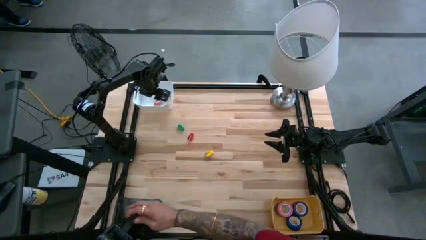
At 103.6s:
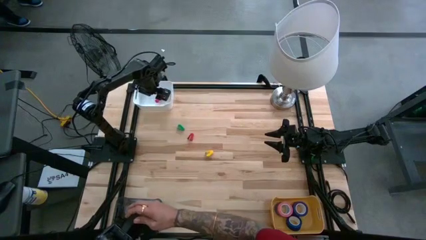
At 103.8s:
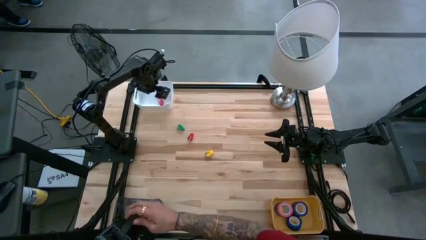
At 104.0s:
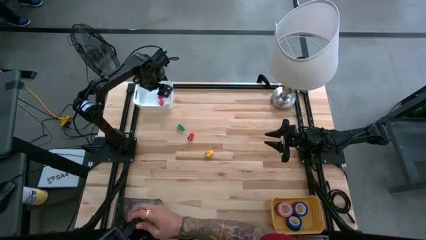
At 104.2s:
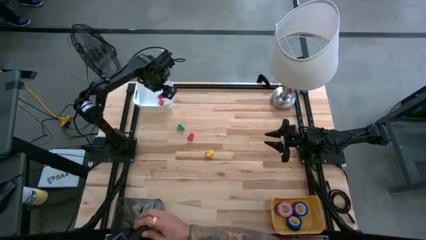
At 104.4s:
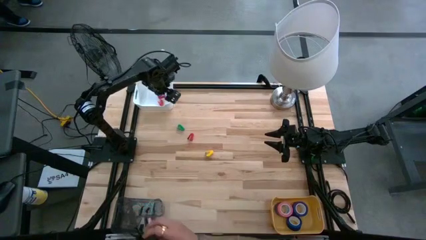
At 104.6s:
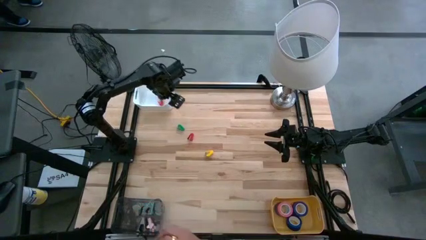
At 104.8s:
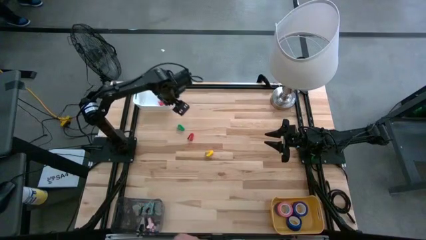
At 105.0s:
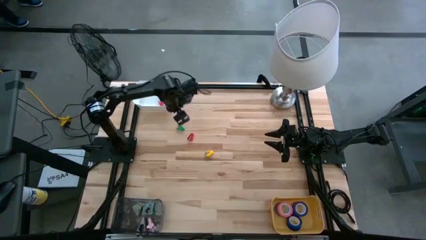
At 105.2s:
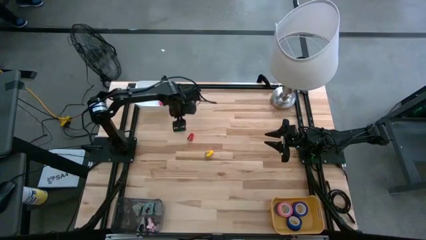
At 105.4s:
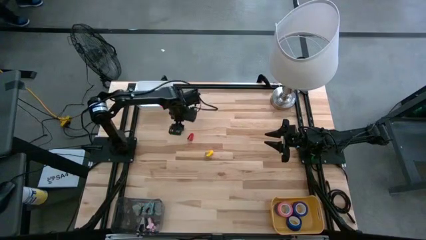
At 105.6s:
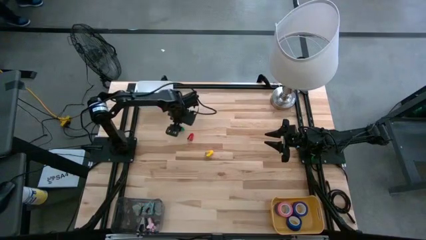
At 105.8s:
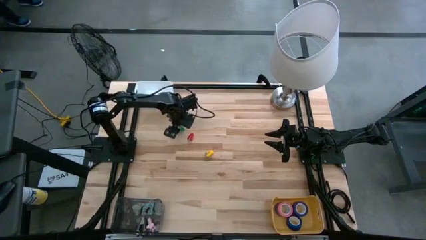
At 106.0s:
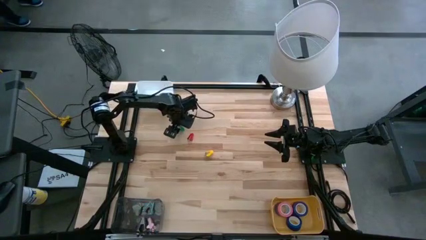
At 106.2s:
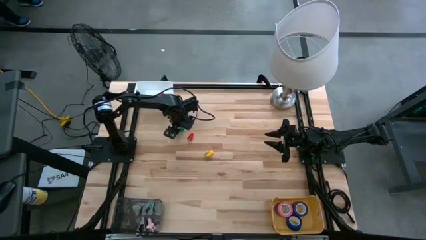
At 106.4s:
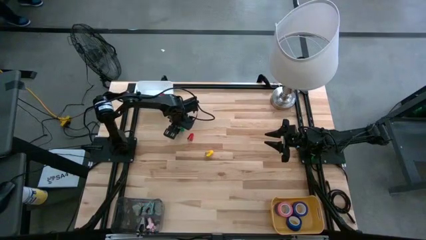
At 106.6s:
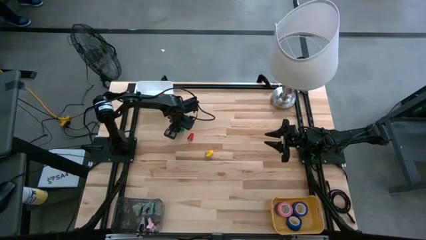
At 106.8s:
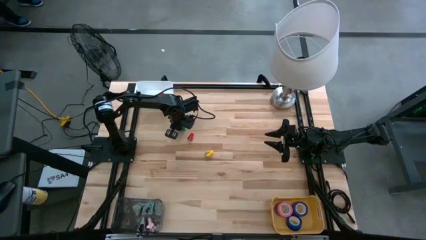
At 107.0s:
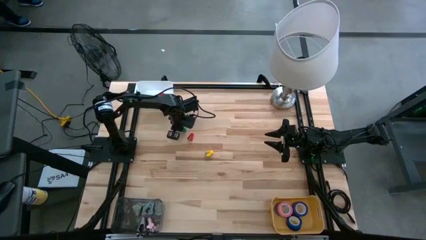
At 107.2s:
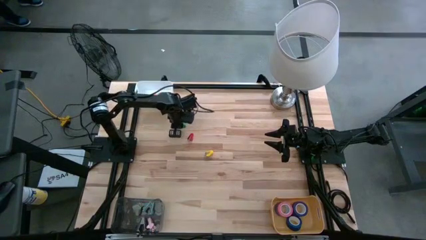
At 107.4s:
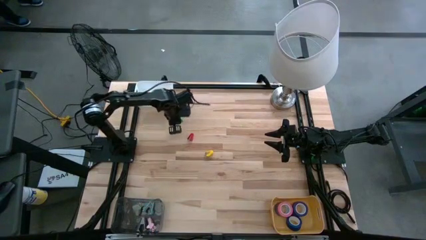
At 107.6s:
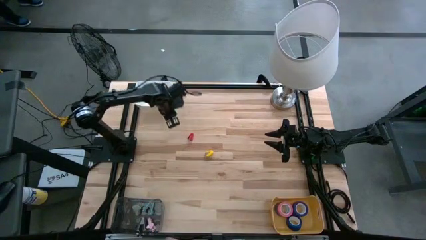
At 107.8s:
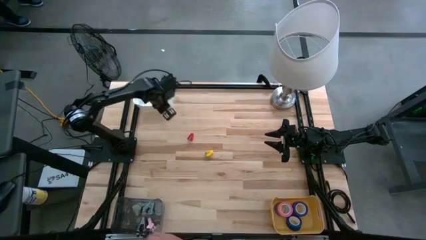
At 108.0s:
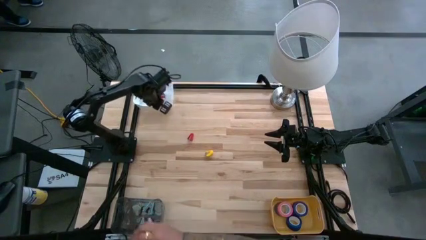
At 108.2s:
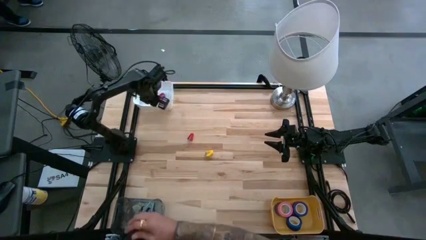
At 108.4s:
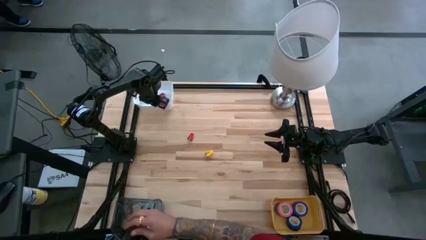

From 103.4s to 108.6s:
Task: Pick and place Stapler, Stapler remover, tape
Put the green stapler into the white bin

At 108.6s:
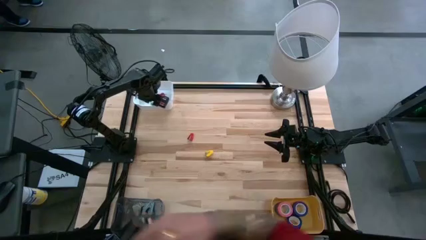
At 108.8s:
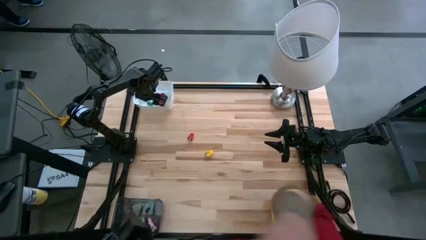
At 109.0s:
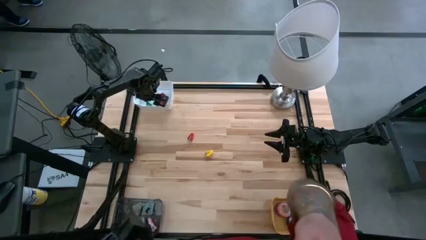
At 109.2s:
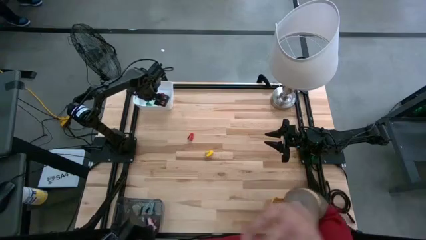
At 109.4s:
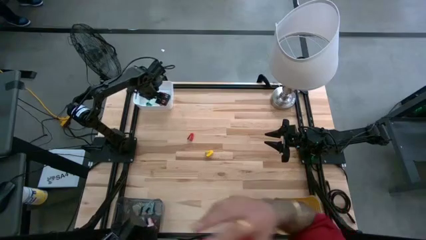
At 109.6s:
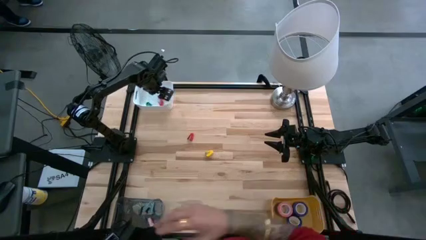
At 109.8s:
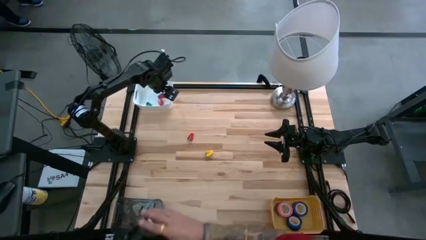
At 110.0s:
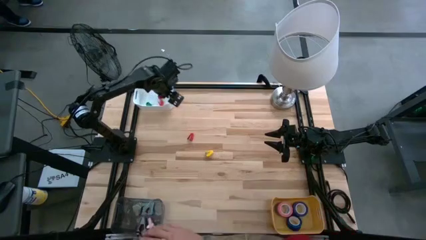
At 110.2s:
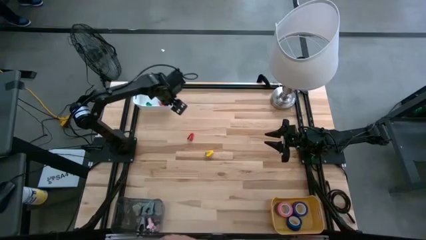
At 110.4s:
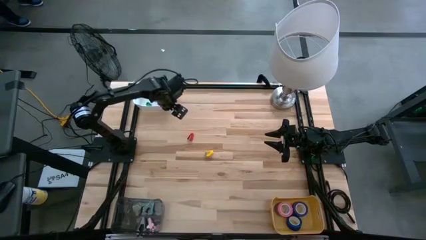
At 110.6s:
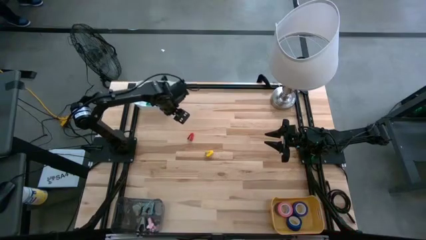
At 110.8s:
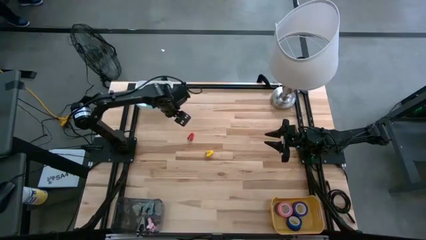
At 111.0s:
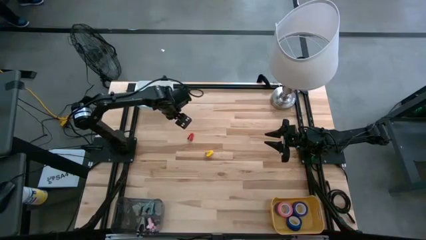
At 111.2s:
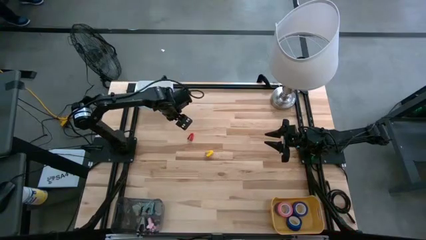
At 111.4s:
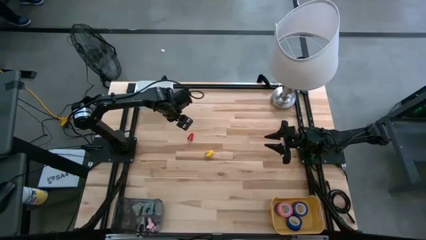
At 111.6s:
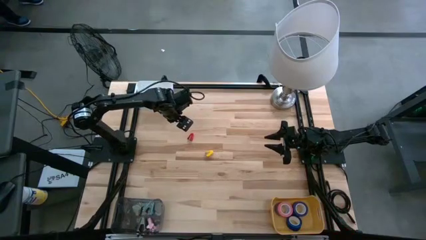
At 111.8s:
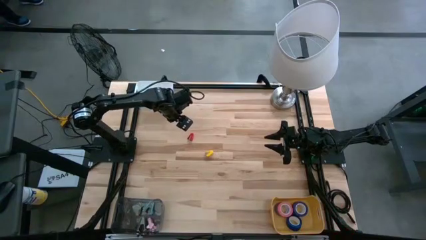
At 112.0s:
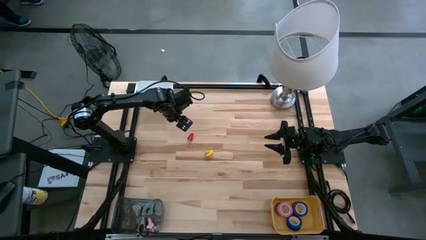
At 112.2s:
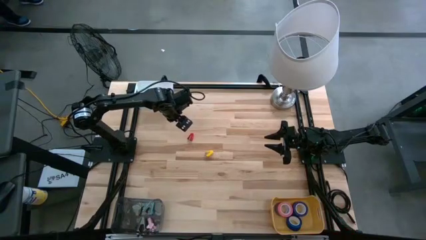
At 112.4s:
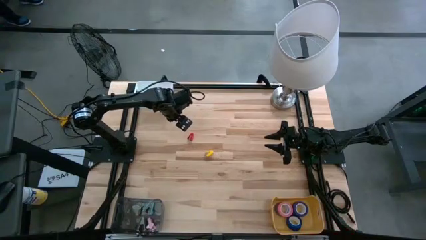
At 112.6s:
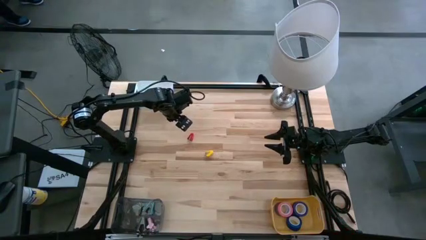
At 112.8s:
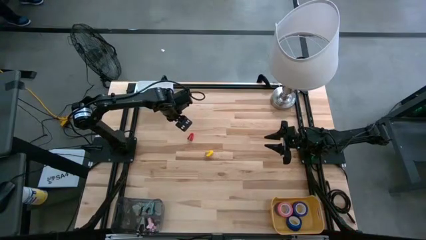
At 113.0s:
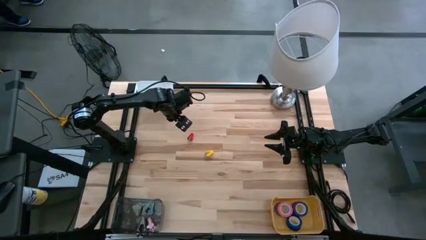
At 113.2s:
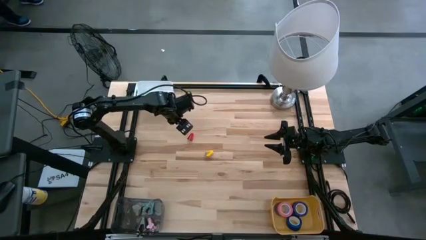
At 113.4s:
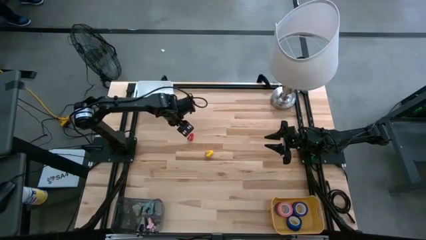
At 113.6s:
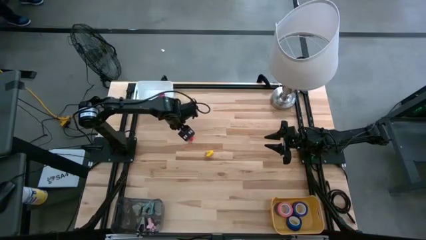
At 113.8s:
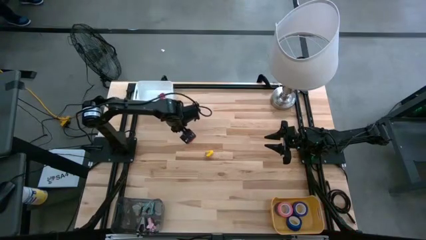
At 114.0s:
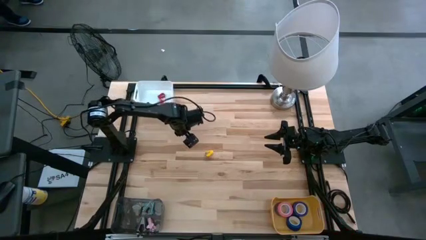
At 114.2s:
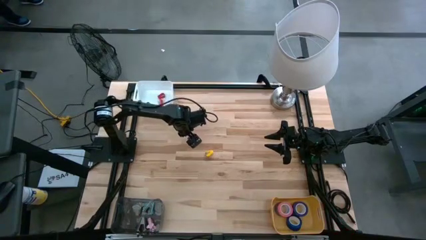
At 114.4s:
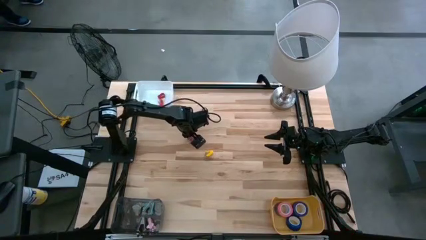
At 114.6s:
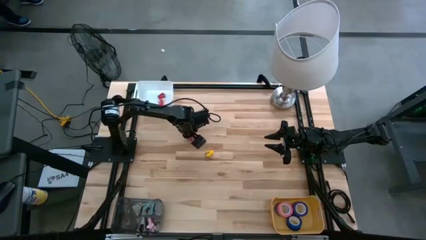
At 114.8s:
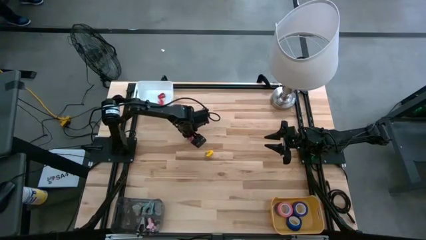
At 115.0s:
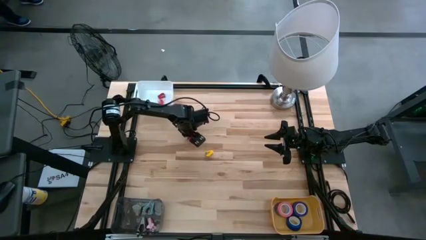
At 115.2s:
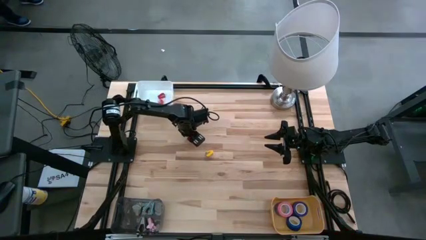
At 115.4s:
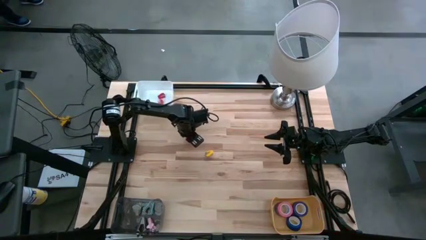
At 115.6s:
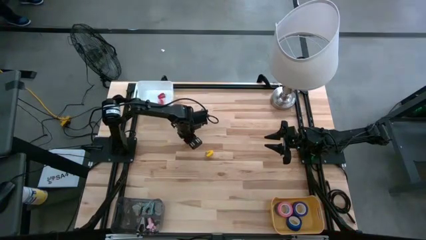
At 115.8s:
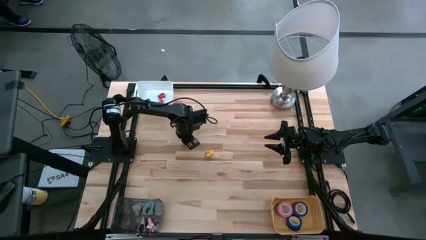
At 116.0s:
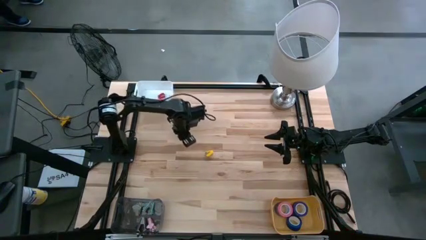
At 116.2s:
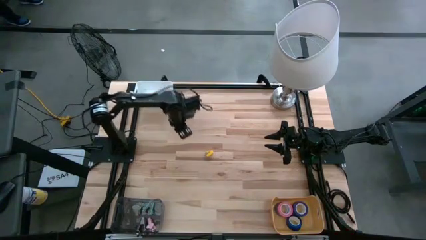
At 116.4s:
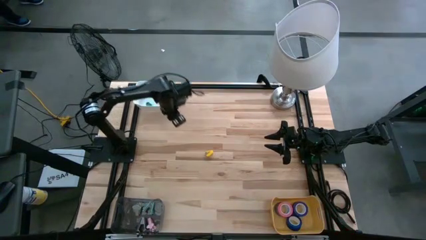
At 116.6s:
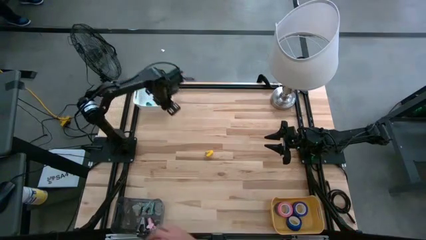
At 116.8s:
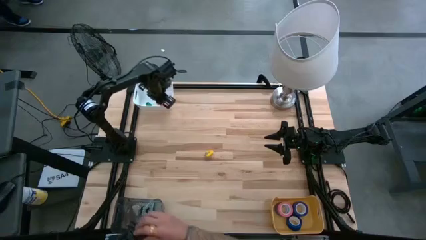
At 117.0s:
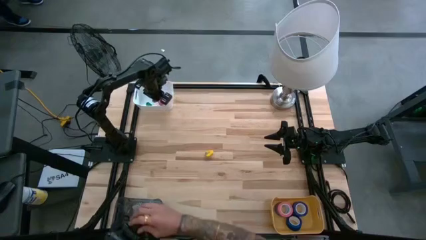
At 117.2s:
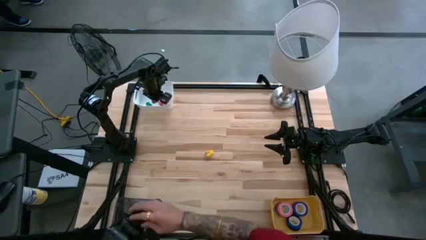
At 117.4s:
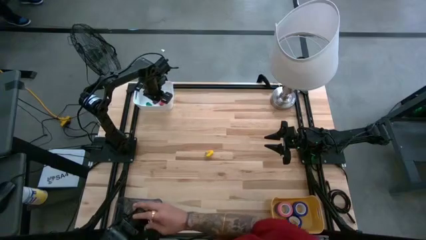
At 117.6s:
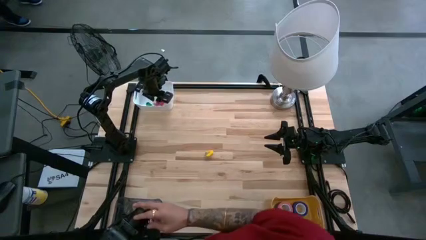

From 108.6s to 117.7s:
Put the red stapler into the white bin
